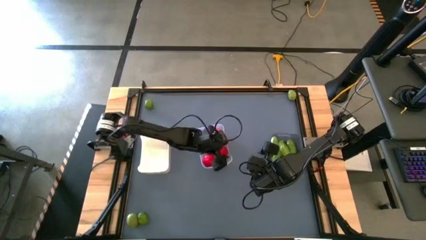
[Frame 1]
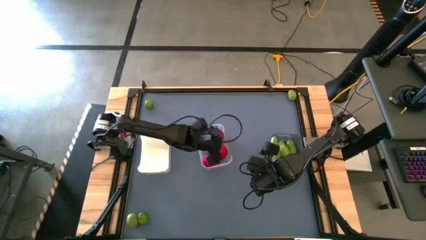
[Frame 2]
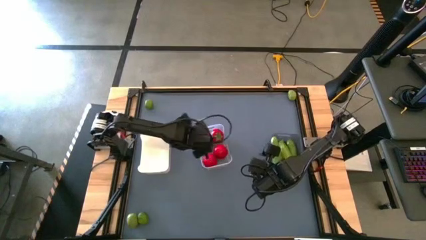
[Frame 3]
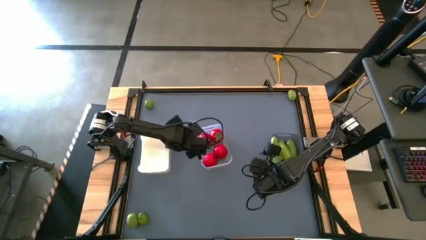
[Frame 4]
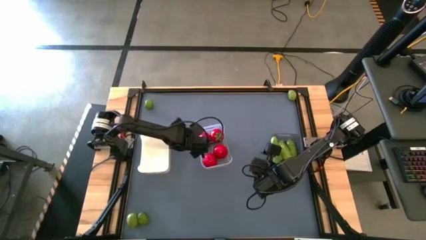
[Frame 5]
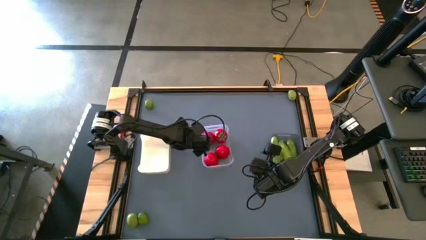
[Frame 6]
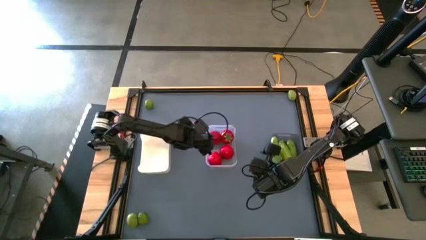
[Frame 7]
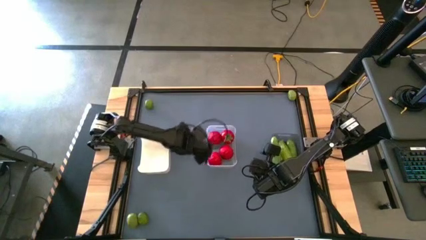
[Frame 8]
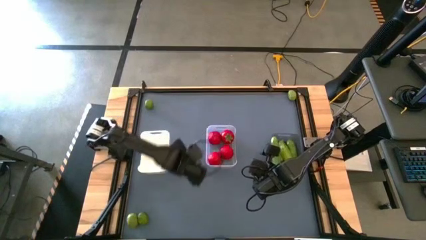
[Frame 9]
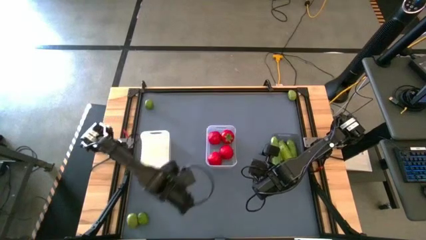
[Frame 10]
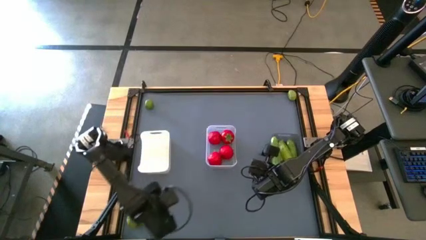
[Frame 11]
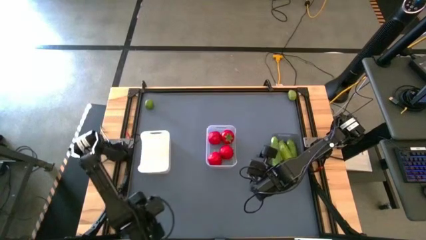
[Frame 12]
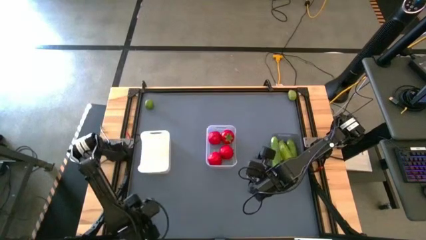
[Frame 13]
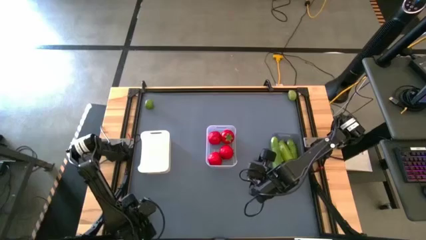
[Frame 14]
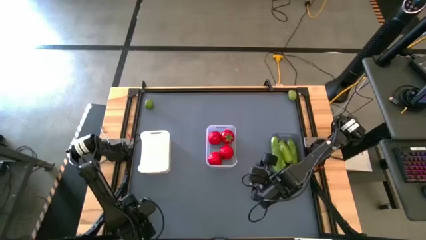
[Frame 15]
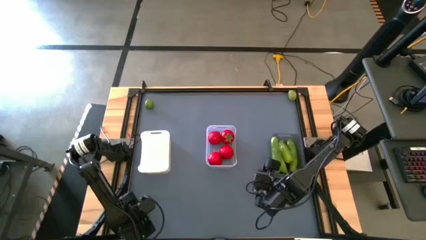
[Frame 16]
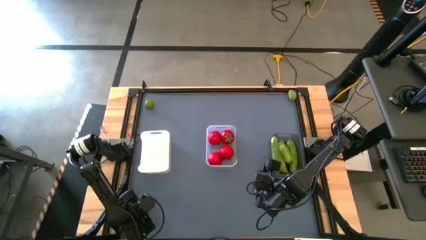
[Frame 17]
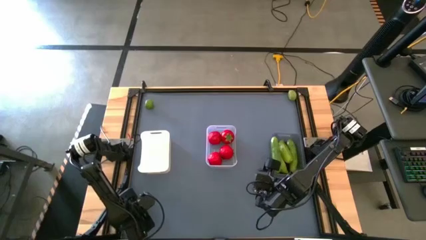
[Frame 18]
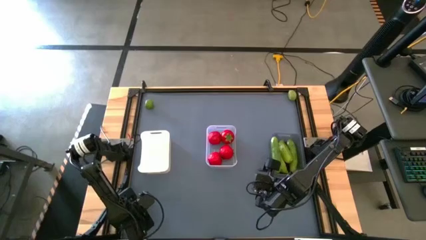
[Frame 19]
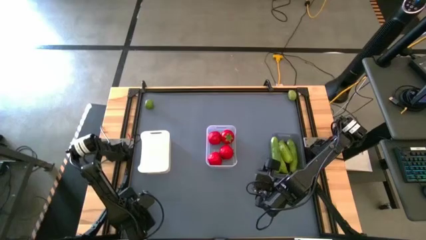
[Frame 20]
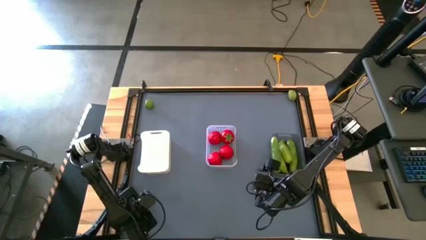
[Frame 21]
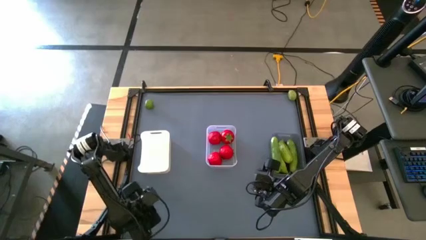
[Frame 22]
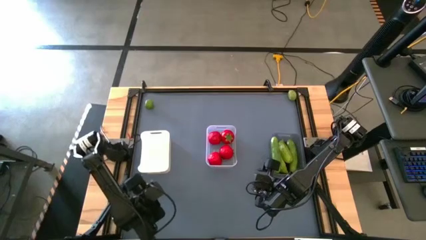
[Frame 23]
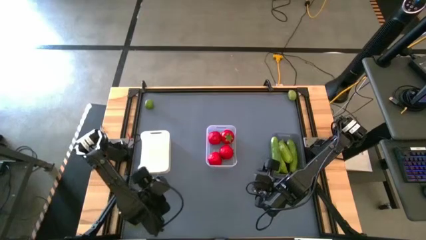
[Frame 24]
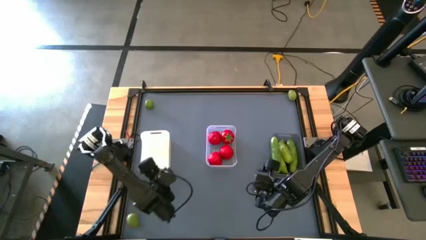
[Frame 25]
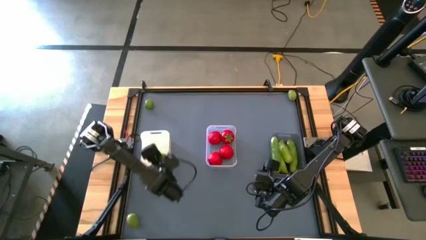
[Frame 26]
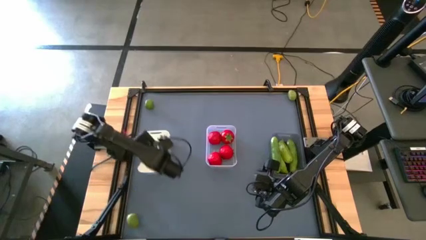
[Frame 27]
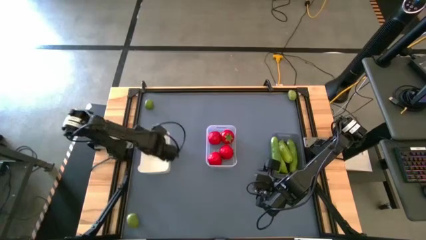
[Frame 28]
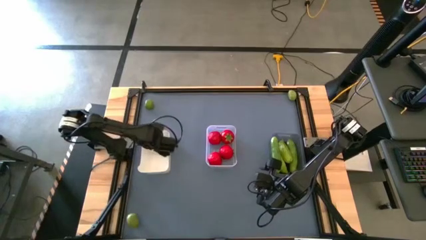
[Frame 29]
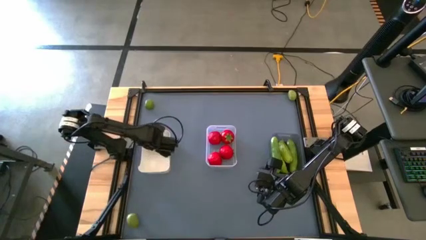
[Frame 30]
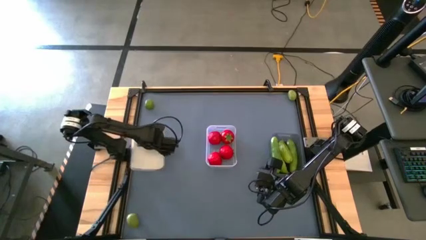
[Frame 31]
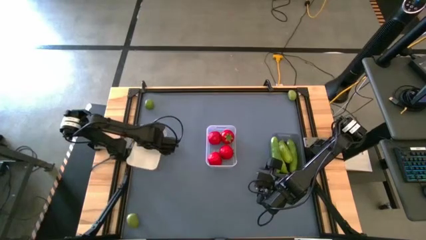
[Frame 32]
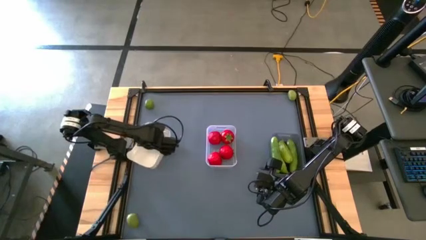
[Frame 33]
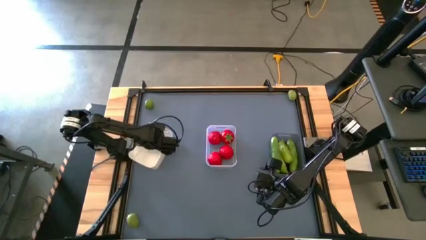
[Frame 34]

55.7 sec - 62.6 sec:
Task: Sort produce into baskets
Put the green lime into the white bin

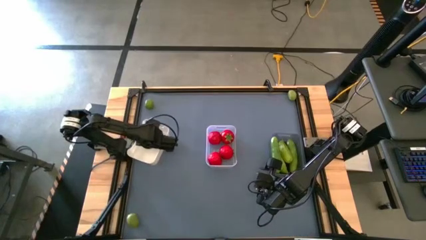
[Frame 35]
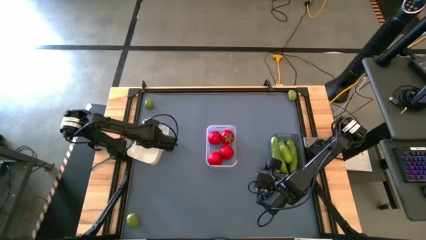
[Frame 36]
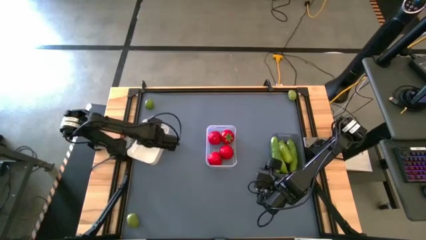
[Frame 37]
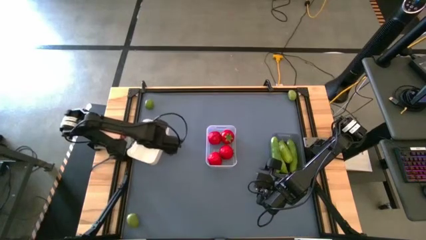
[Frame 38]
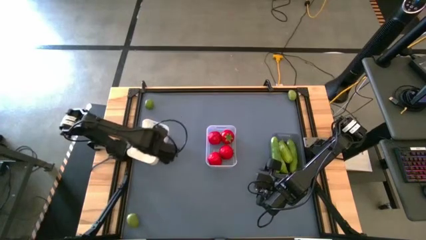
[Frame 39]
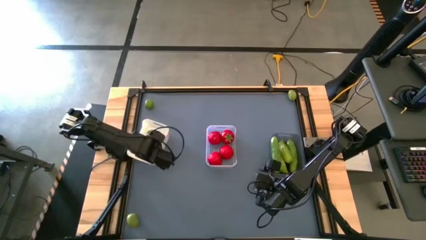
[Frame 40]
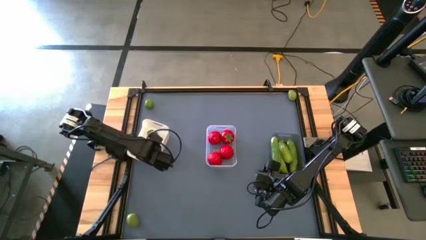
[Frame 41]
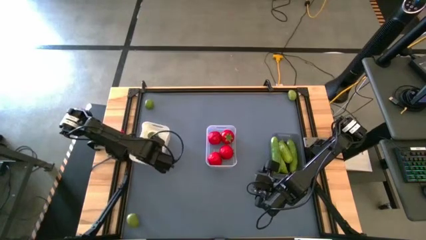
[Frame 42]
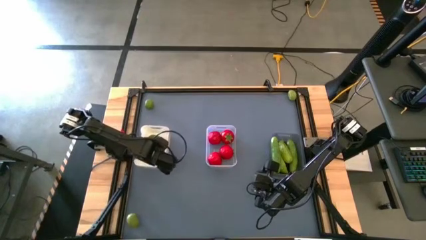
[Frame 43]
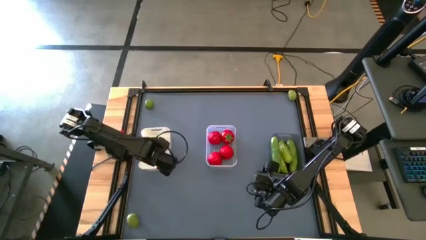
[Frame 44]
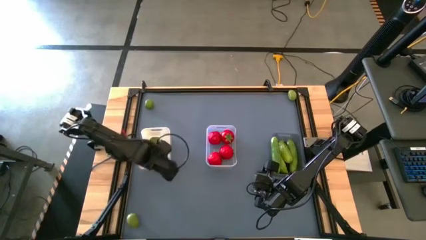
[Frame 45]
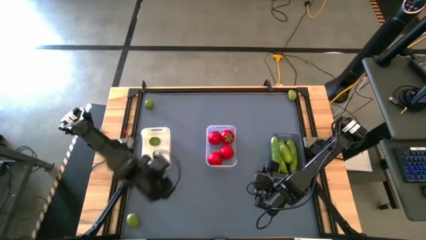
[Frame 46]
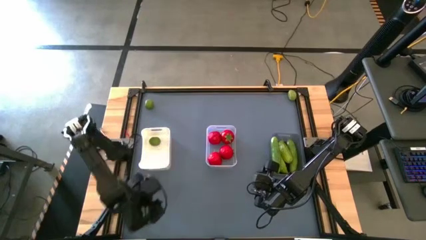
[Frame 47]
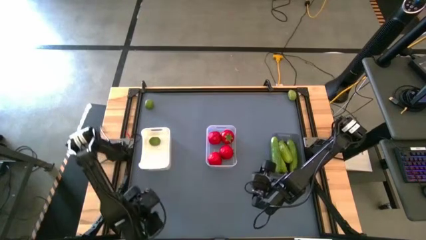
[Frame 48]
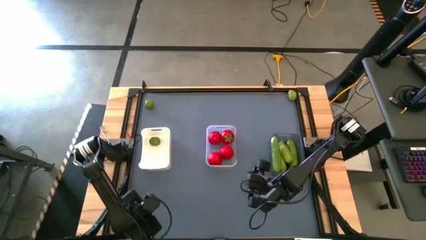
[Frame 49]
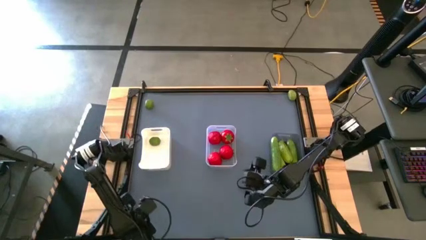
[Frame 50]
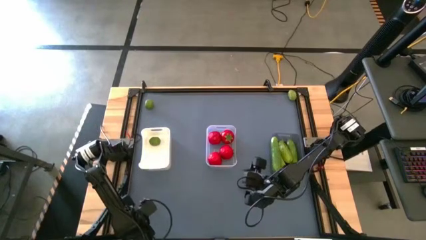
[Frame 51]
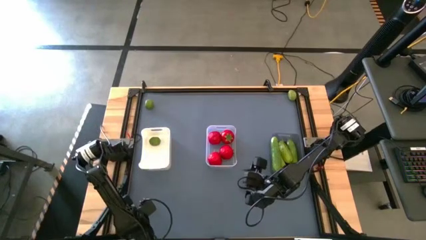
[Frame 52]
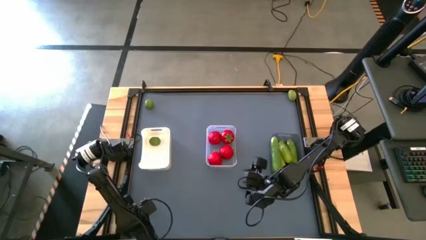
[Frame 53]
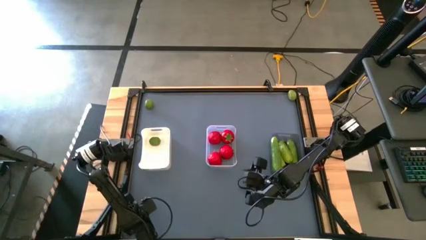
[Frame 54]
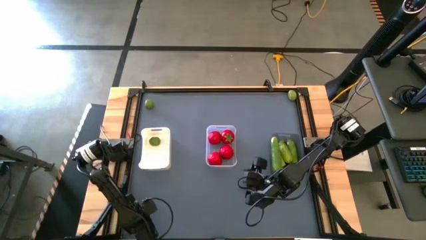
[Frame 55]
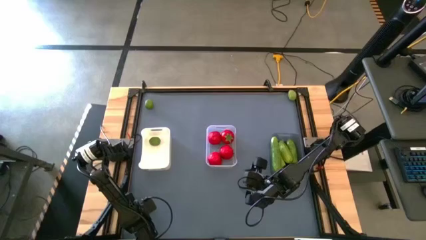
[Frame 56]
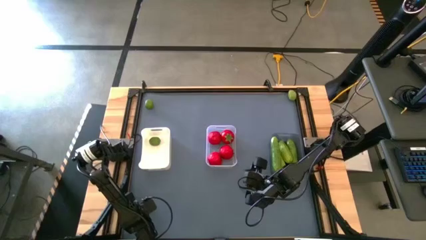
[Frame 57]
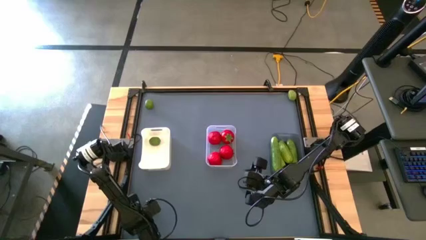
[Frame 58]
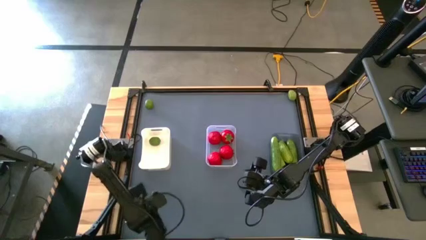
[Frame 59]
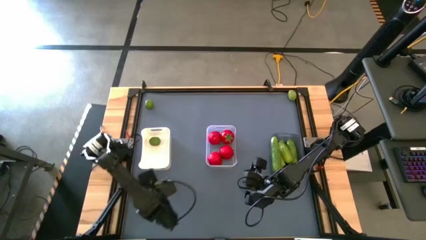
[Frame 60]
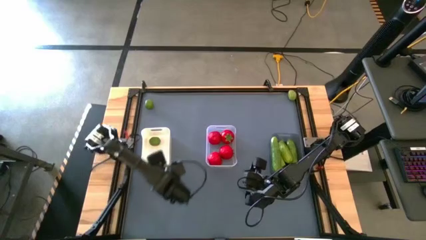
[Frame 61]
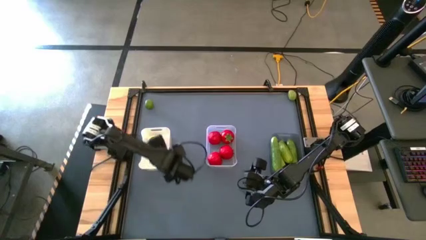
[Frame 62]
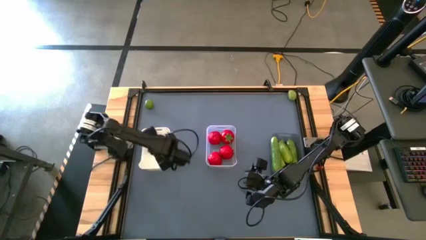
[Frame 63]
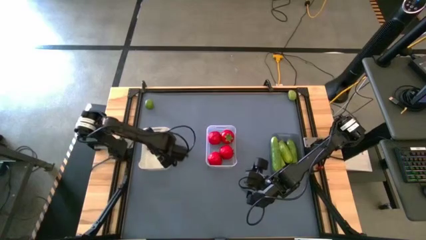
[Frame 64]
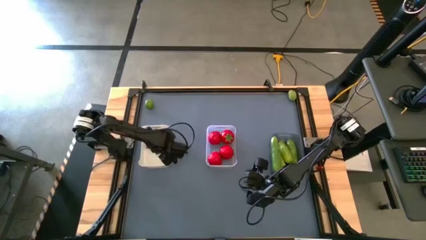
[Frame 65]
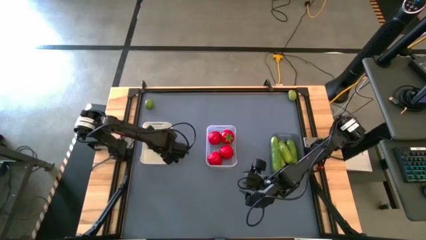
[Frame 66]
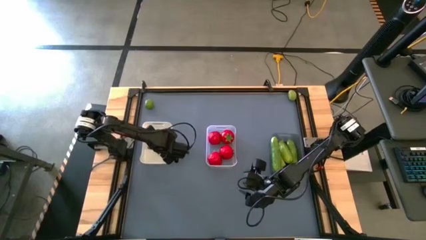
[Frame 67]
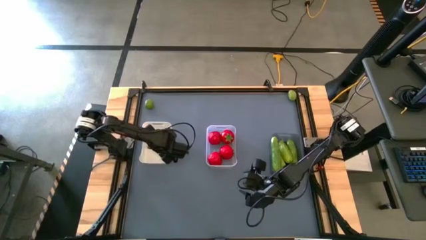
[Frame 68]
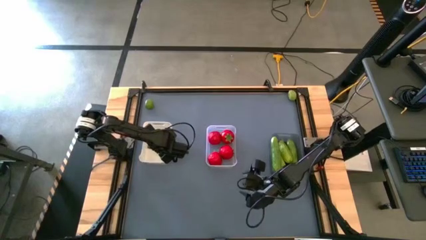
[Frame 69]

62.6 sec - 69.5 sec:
Put the green lime into the white bin

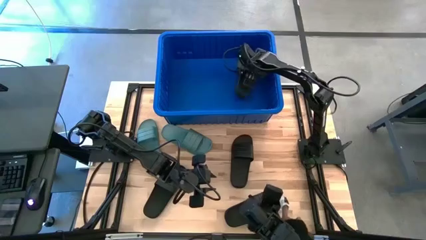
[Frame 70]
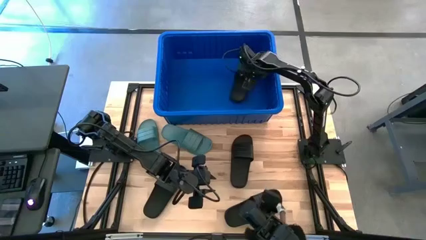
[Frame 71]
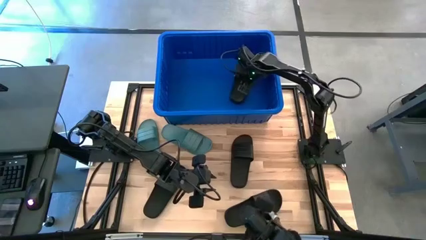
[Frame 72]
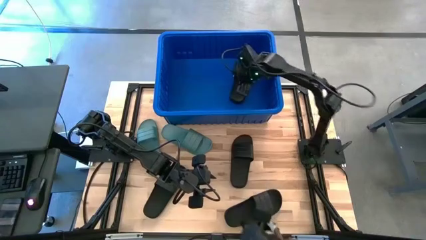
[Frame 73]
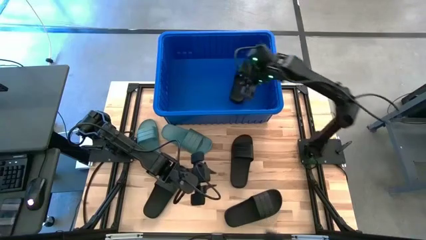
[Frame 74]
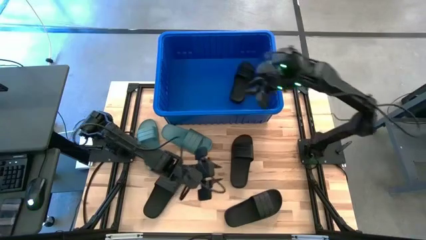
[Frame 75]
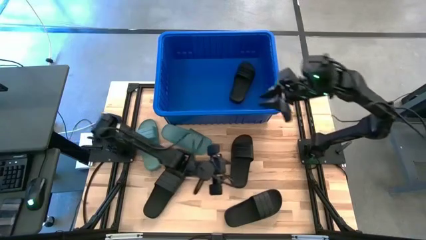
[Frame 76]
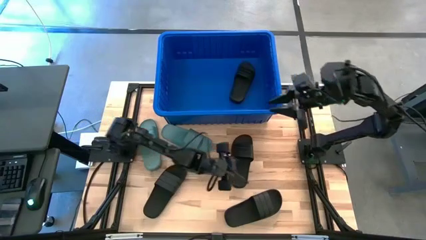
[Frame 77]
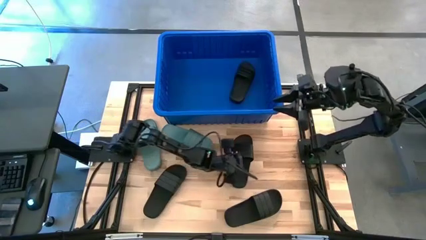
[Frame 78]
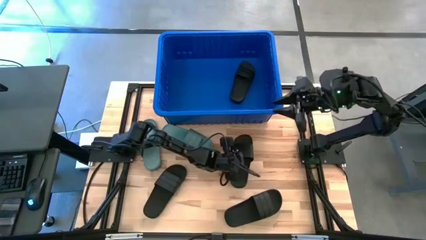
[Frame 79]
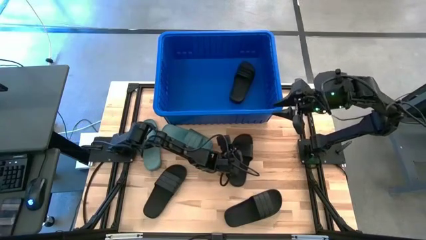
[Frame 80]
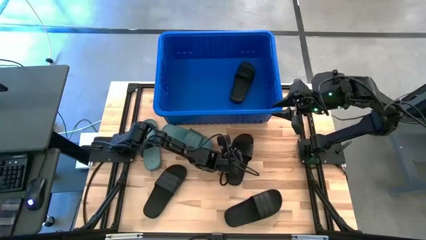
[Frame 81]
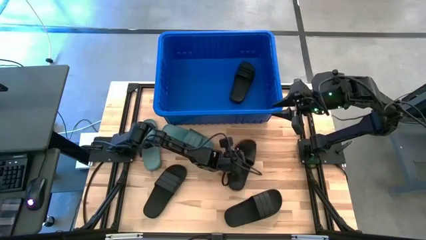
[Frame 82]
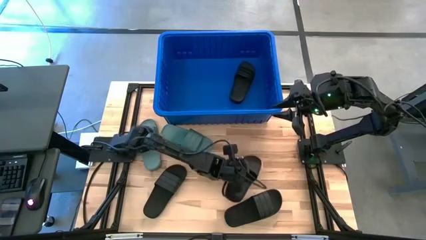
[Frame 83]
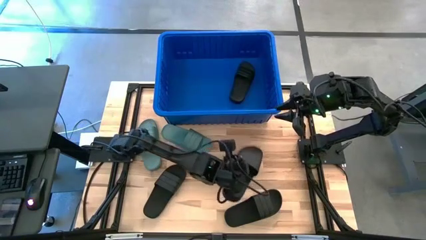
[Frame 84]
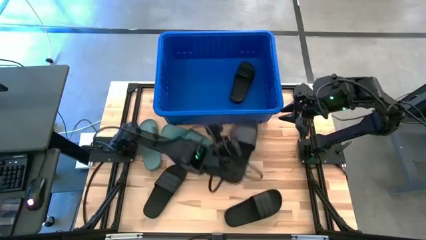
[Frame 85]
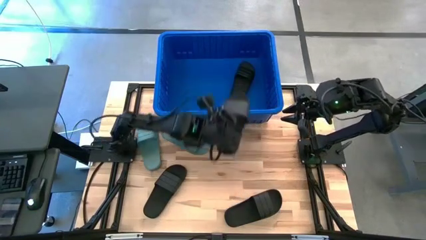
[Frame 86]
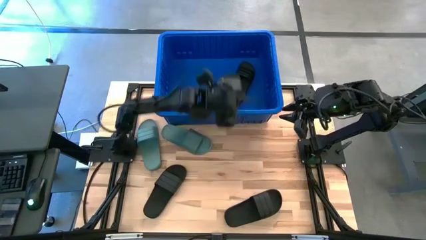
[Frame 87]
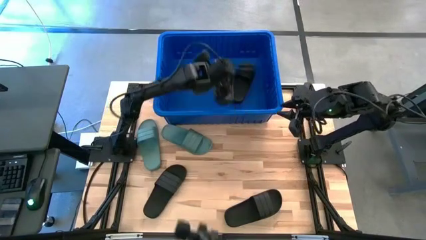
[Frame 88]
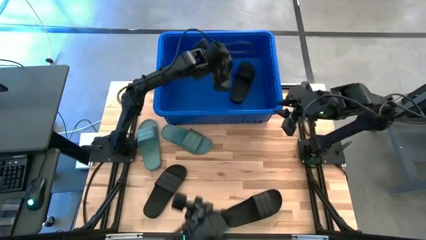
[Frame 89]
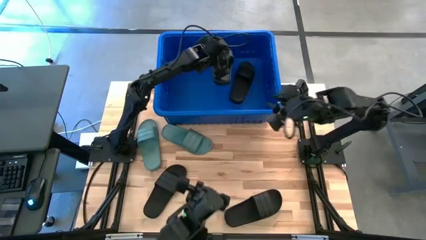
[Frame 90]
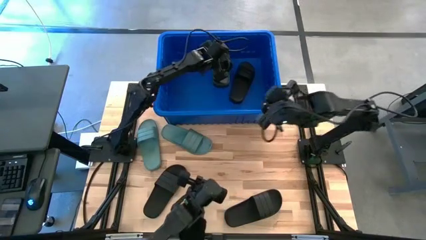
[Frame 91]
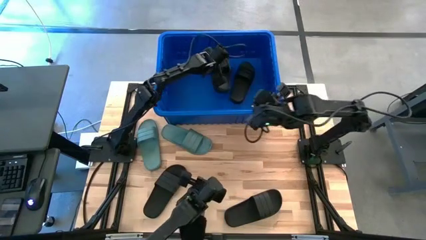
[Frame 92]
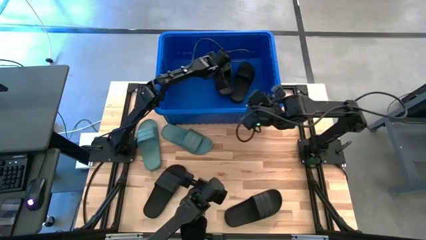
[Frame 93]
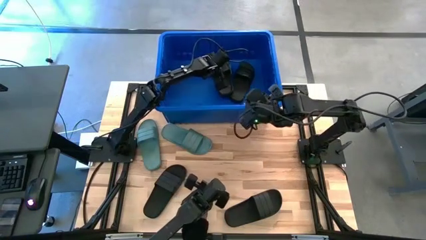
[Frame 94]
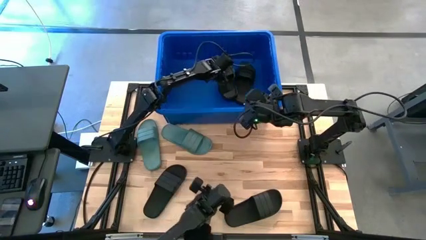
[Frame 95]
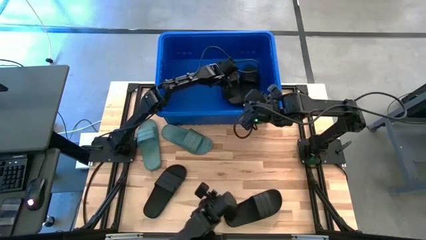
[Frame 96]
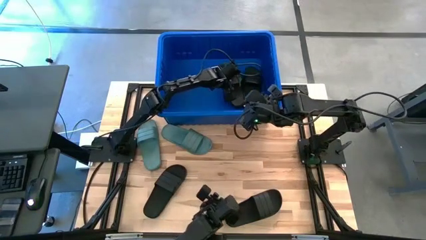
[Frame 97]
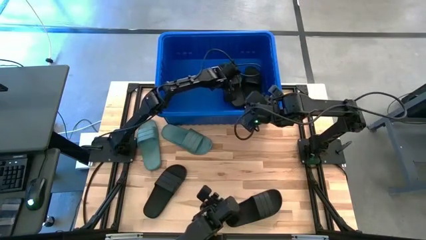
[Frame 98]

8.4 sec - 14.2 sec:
Task: Pick and place slides into bin
Put the black slide into the blue bin
